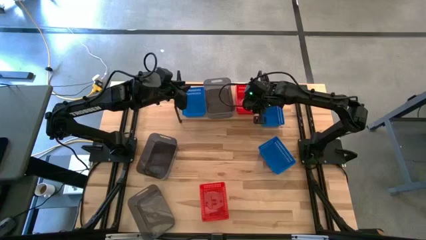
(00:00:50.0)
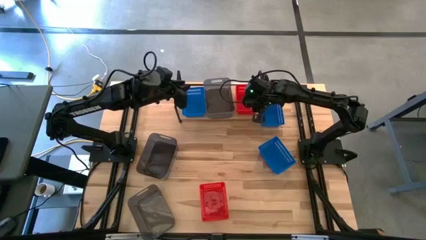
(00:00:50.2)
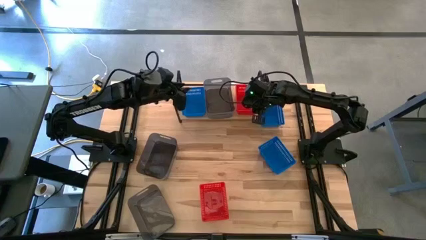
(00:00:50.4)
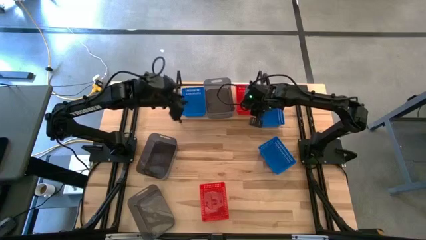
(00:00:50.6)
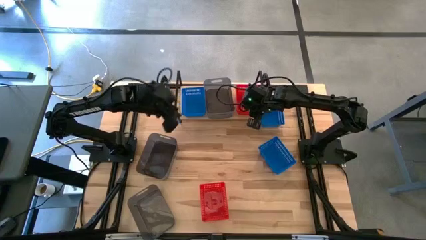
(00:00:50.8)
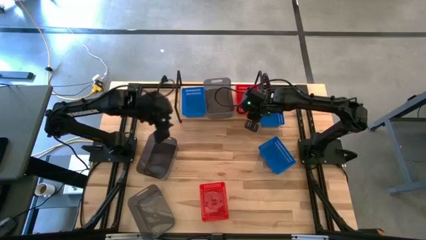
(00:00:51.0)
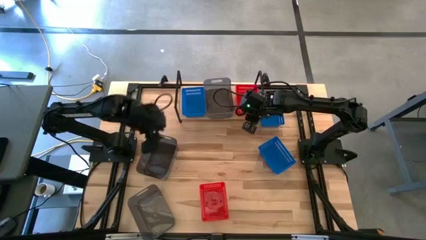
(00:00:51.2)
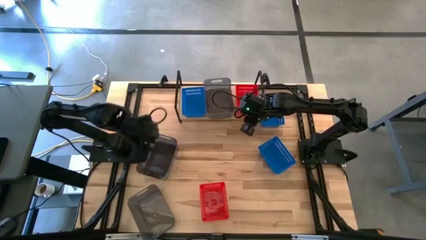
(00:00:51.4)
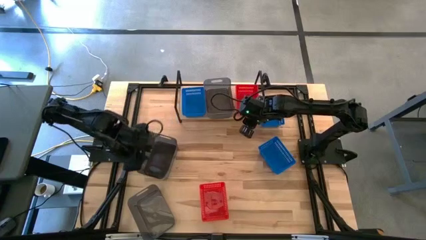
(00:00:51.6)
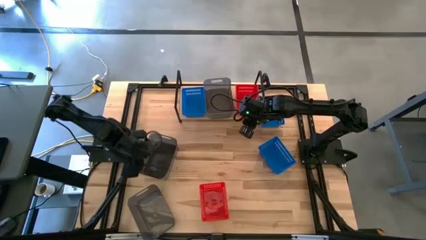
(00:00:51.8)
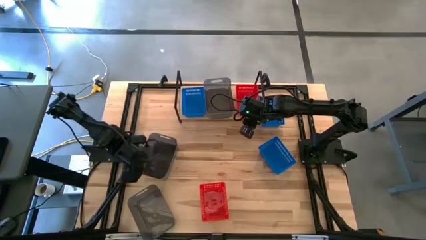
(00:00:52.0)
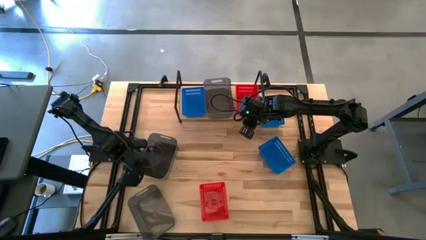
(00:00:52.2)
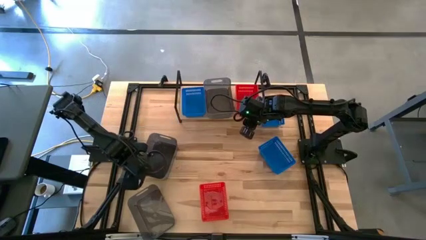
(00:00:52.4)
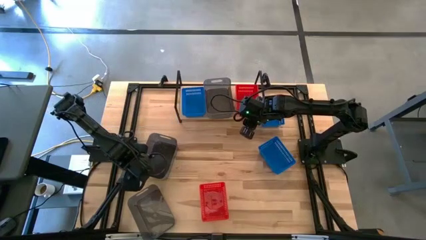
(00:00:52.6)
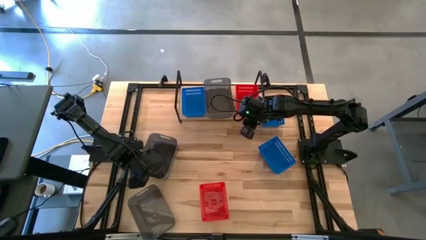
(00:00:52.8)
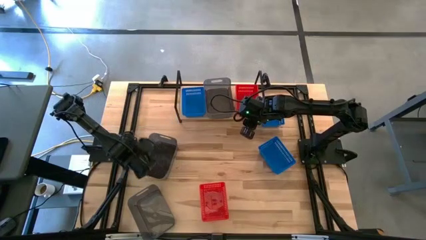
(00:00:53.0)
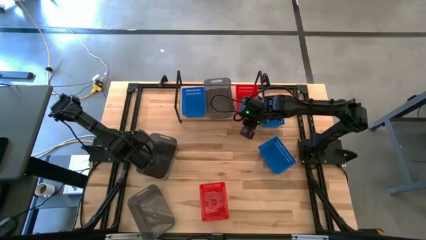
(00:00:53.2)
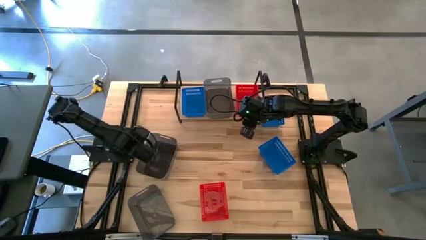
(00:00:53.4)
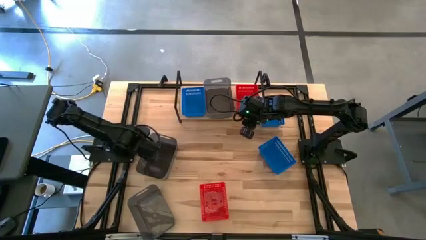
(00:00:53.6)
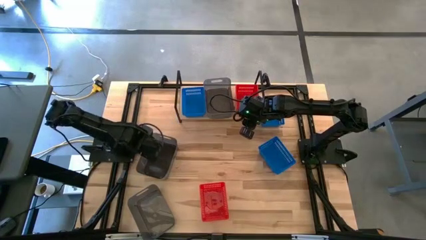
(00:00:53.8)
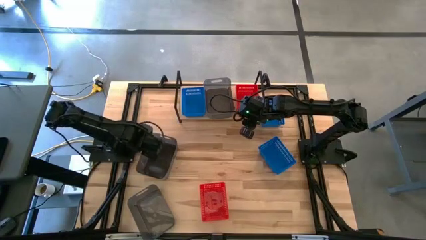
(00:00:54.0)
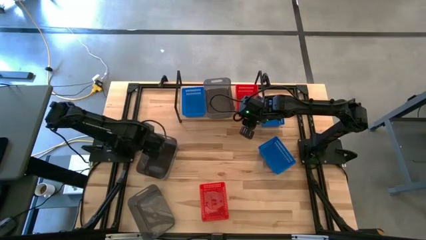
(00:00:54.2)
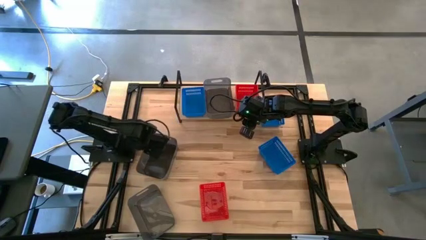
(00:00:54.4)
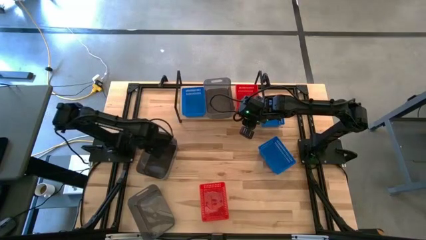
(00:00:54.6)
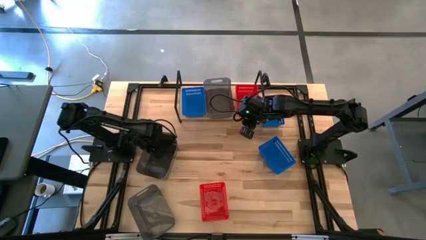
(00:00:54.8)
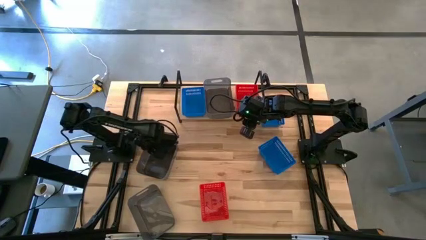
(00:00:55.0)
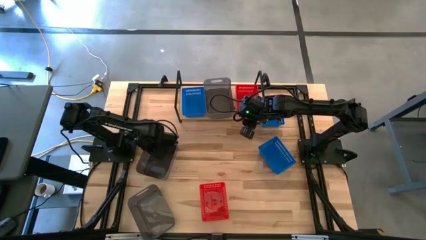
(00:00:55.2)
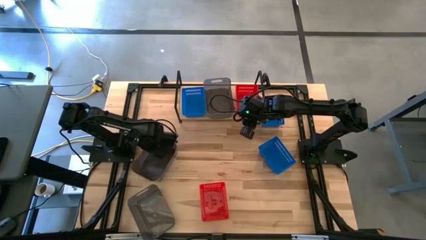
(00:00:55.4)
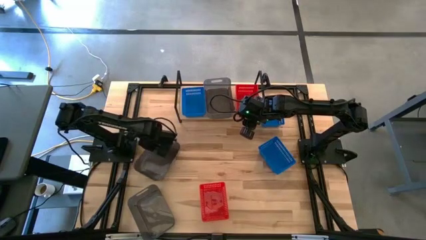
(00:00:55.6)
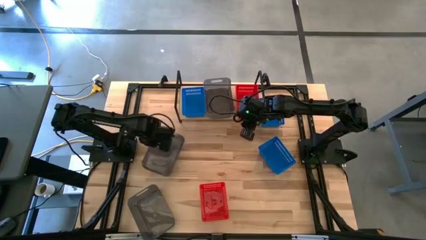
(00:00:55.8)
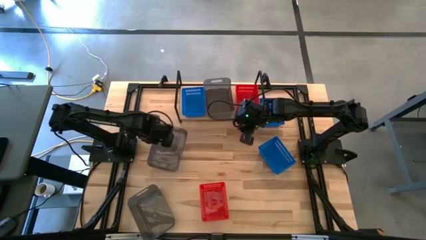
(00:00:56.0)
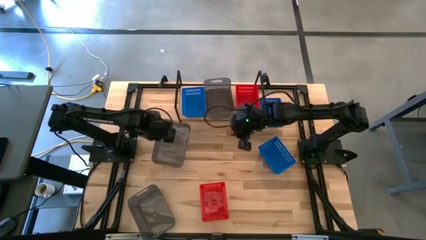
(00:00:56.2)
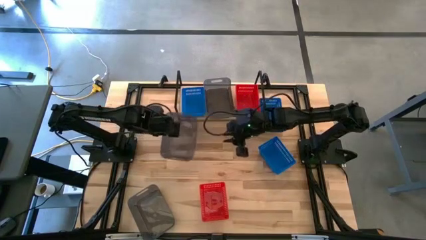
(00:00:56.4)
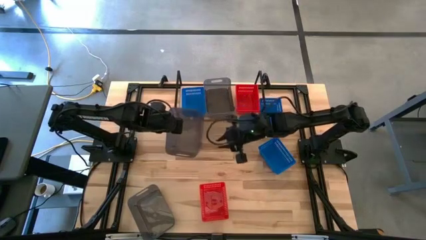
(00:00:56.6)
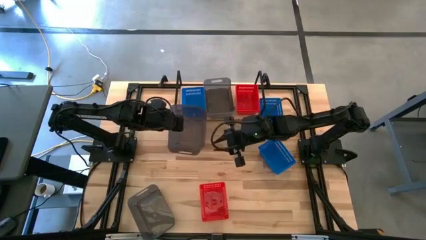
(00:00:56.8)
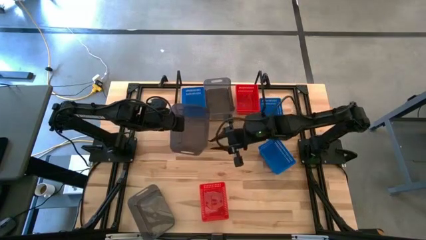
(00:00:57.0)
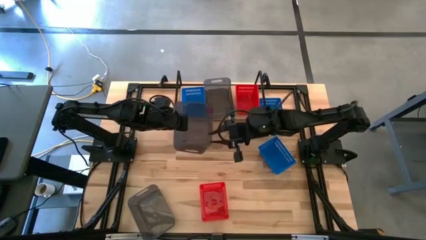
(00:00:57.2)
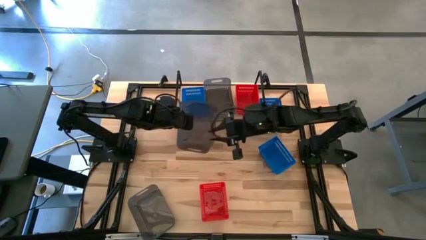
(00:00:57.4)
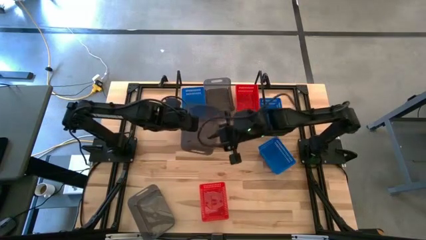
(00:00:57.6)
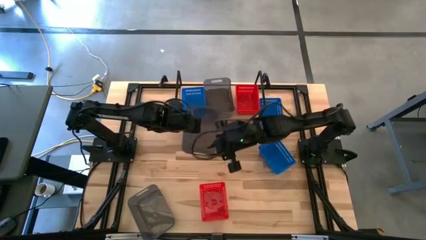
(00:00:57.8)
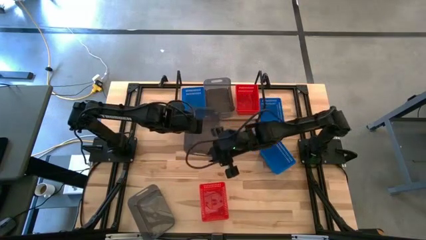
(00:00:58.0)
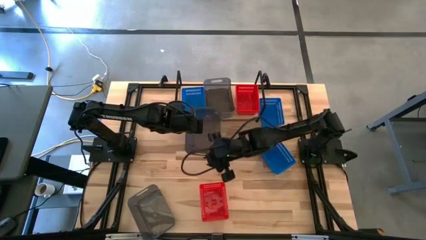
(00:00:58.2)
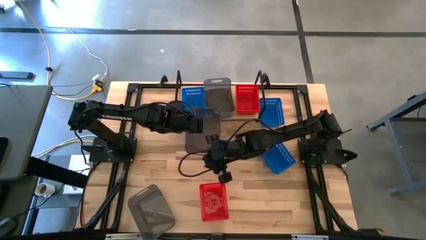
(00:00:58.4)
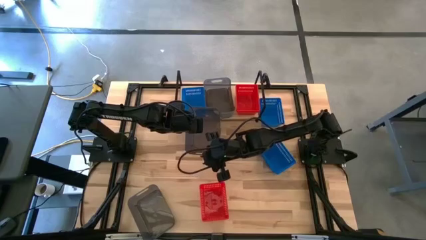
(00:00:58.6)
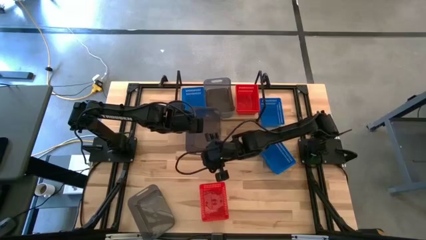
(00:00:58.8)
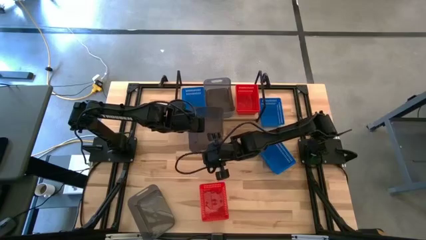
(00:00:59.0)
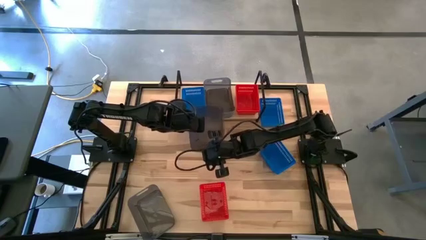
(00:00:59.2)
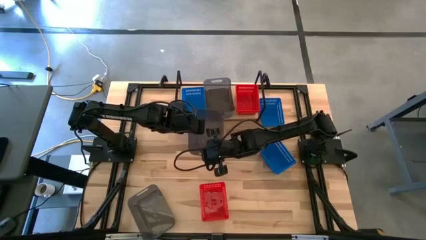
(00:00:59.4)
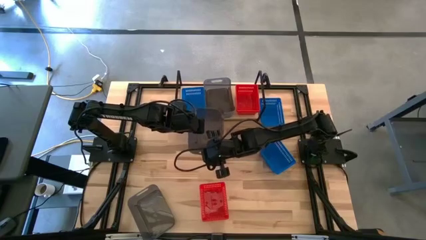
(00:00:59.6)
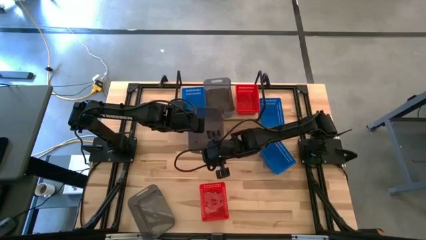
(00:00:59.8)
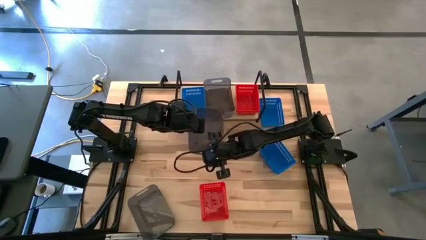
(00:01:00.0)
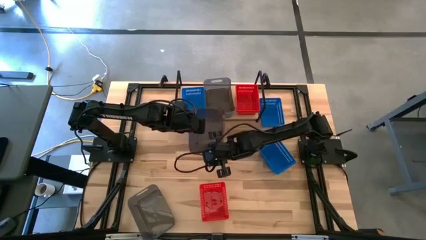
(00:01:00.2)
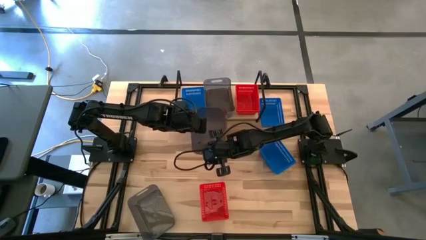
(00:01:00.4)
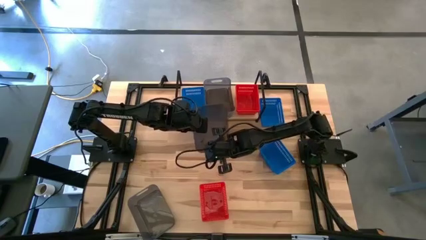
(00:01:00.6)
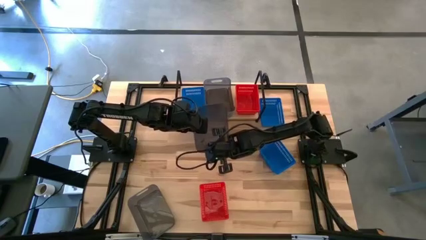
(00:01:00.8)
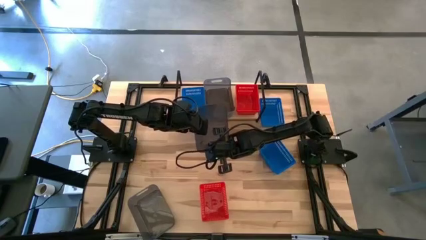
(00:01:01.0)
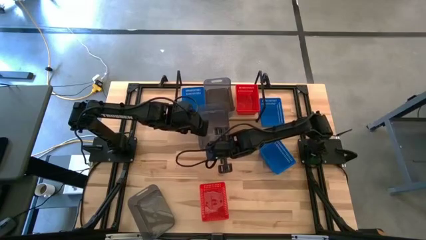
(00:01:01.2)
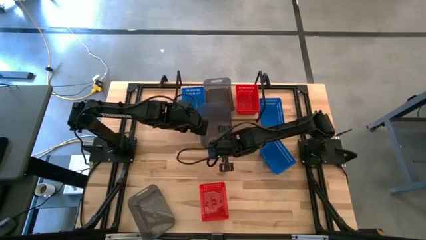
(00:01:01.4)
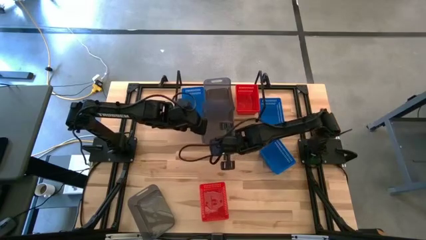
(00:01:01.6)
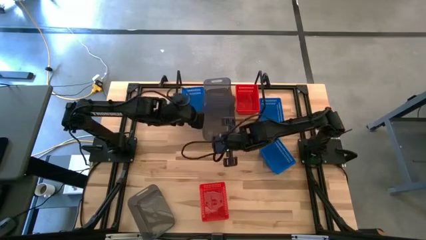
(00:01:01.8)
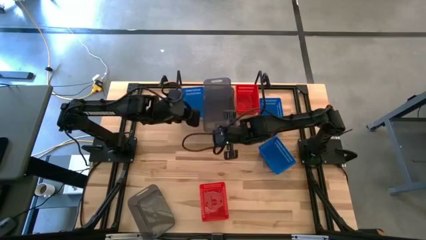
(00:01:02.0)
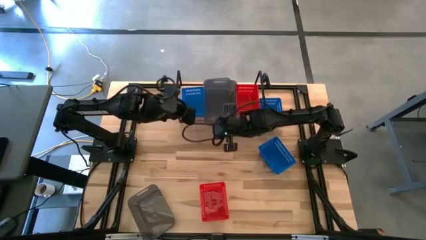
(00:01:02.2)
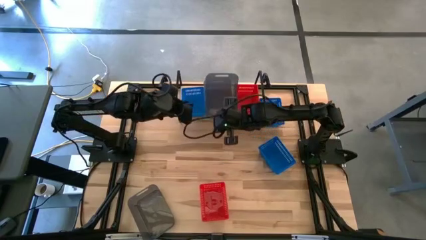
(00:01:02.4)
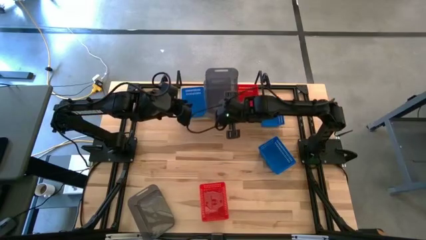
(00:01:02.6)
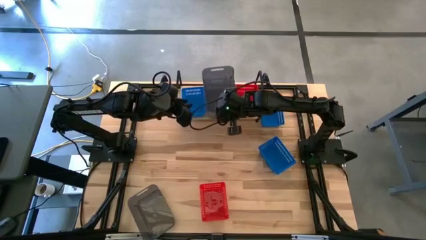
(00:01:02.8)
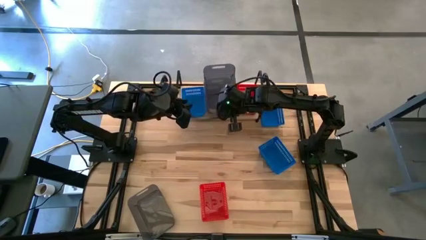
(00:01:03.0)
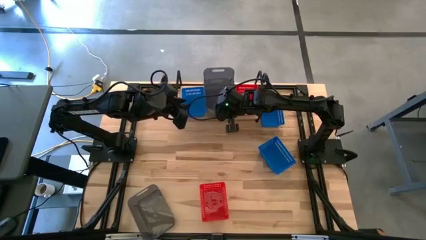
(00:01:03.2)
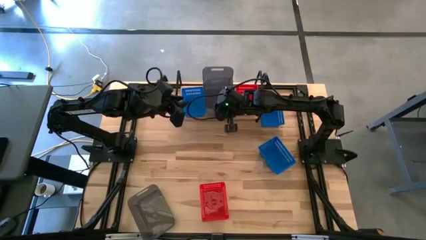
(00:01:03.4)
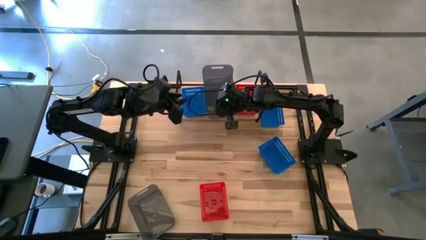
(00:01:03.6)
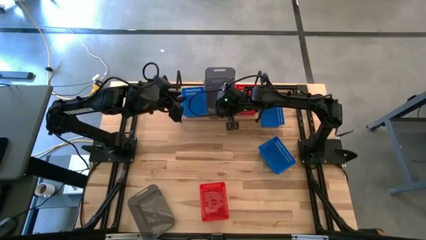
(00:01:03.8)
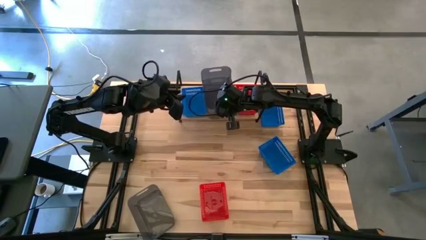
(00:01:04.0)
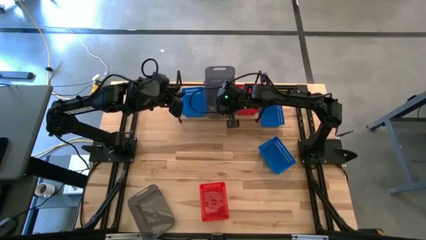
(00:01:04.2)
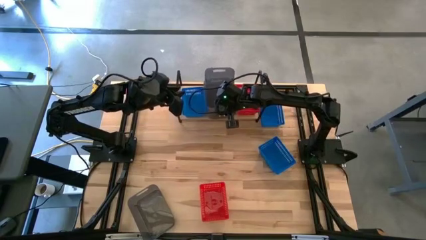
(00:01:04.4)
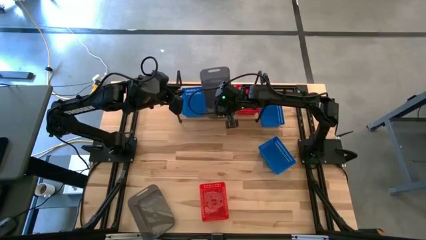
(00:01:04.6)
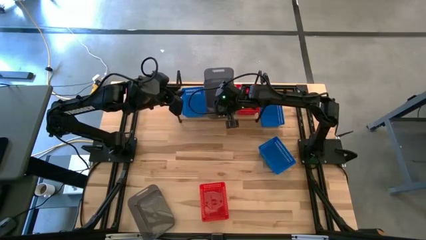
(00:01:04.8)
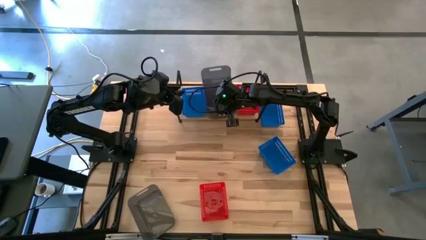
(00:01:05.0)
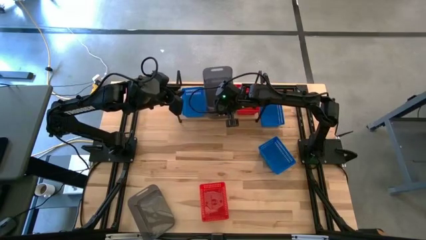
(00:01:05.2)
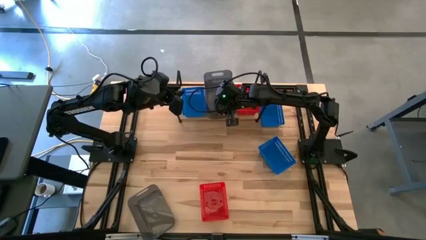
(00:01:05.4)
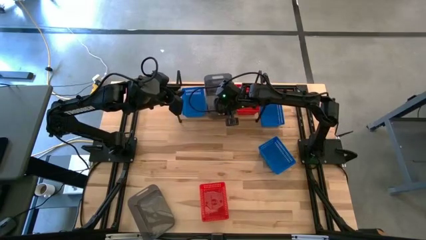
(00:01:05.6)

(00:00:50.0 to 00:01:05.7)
Task: Stack baskets on shelf by color
Stack the top black bin on the other black bin on the shelf
